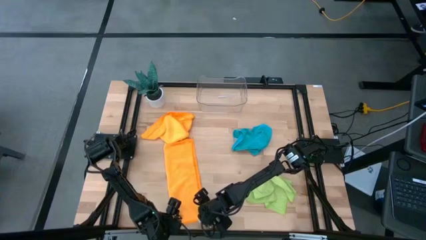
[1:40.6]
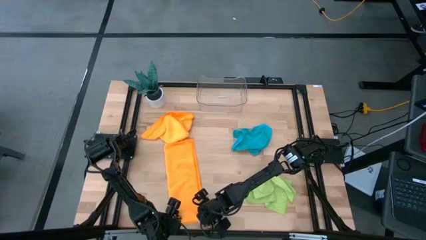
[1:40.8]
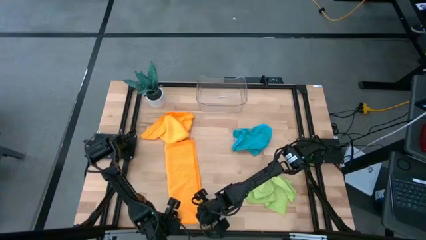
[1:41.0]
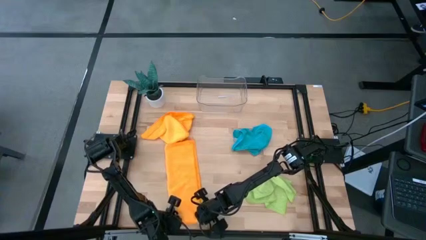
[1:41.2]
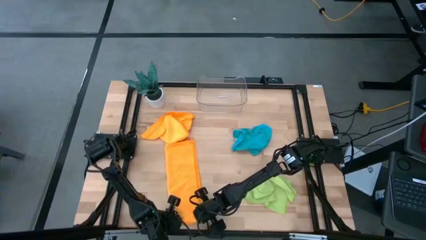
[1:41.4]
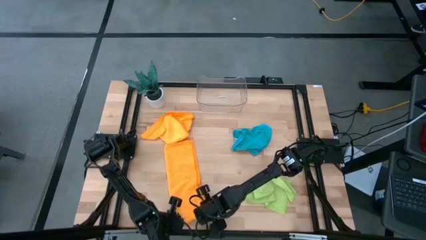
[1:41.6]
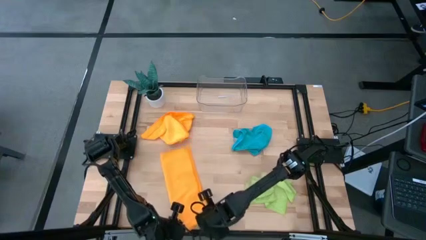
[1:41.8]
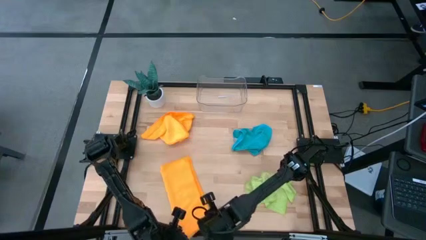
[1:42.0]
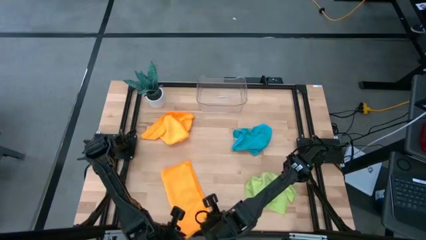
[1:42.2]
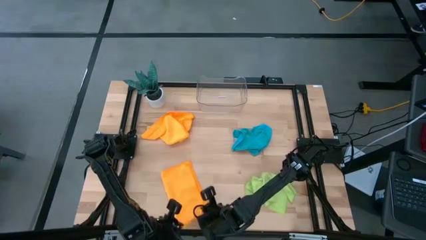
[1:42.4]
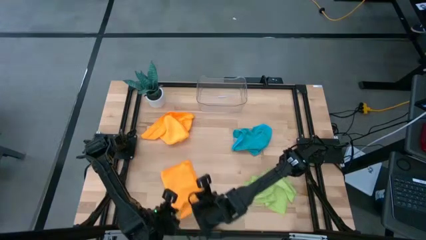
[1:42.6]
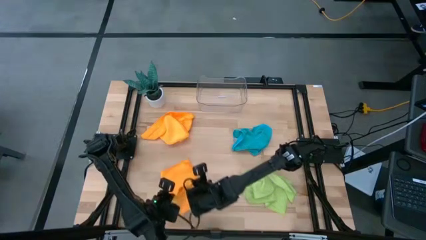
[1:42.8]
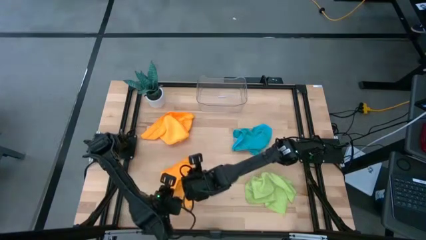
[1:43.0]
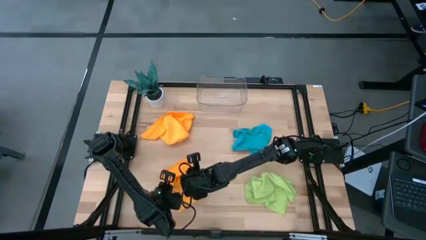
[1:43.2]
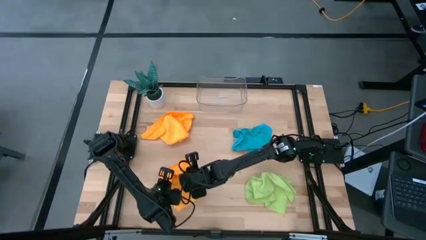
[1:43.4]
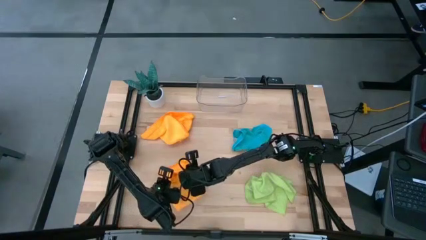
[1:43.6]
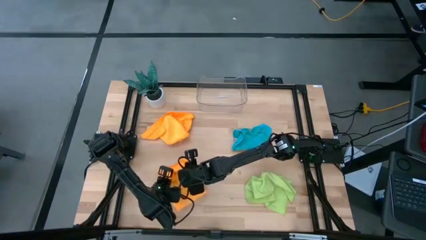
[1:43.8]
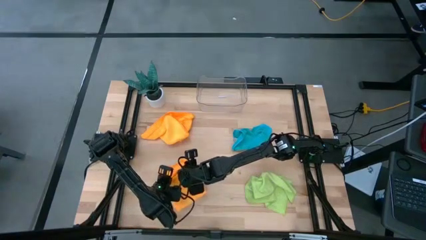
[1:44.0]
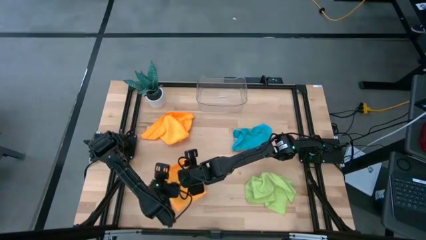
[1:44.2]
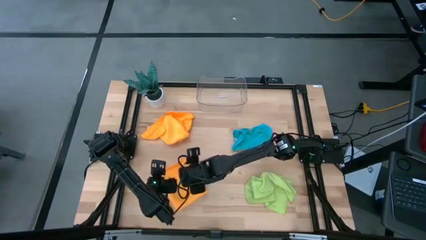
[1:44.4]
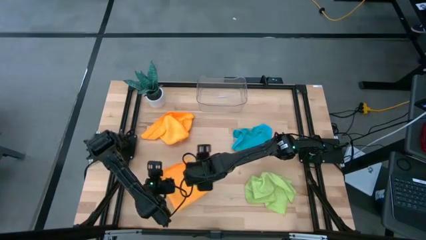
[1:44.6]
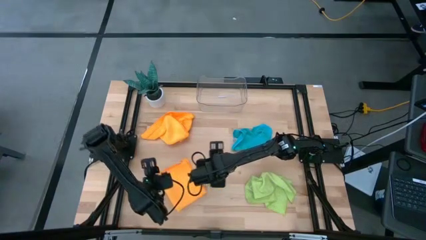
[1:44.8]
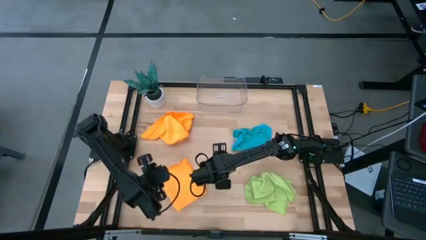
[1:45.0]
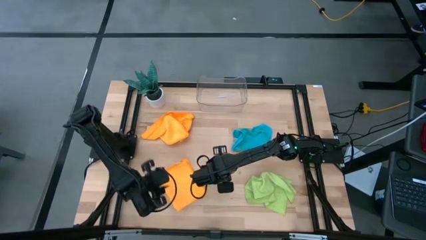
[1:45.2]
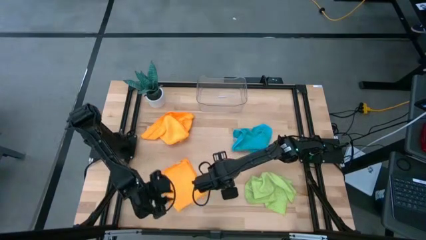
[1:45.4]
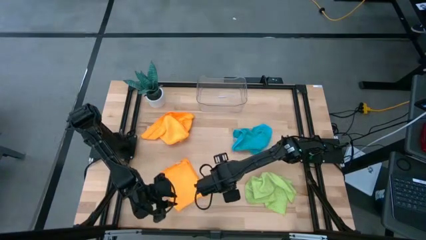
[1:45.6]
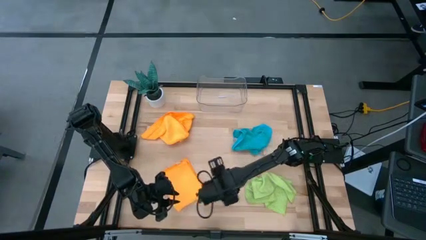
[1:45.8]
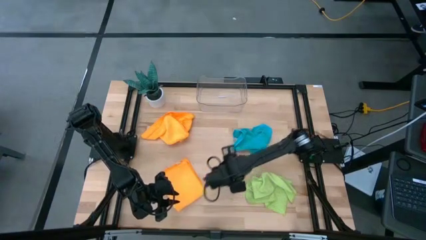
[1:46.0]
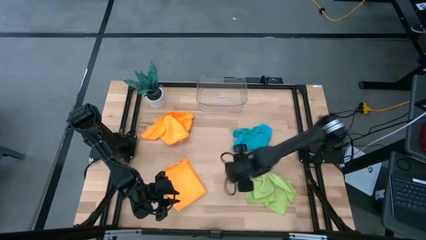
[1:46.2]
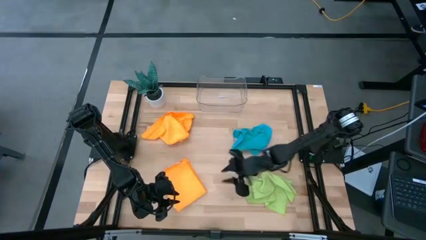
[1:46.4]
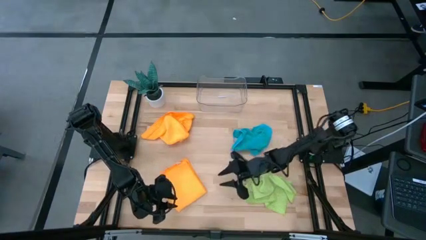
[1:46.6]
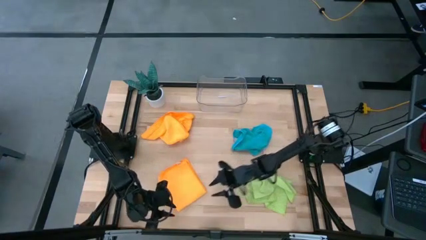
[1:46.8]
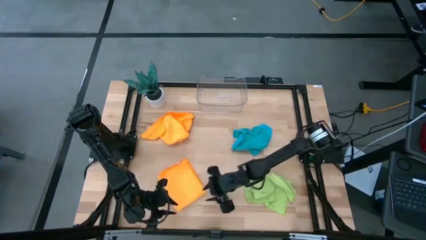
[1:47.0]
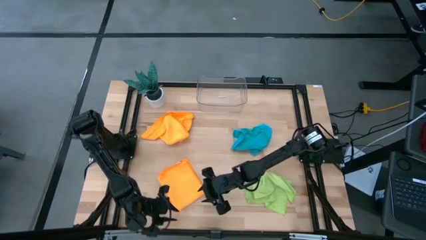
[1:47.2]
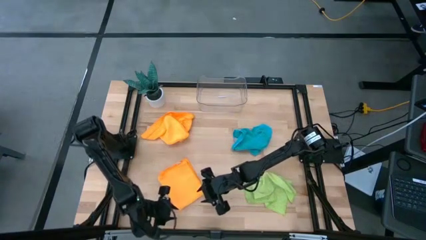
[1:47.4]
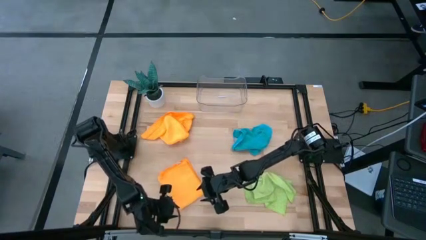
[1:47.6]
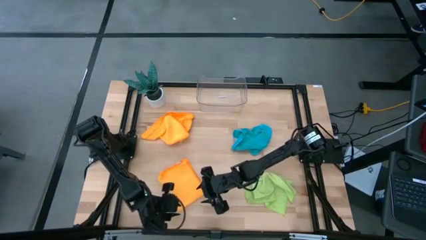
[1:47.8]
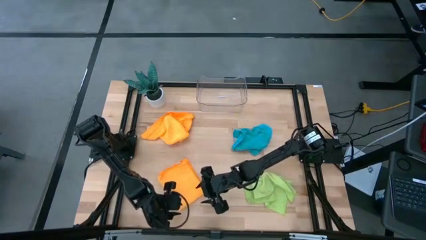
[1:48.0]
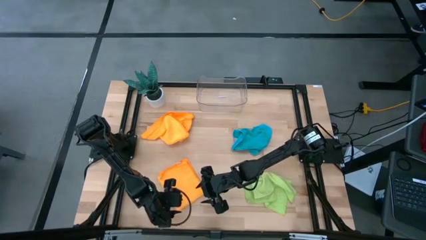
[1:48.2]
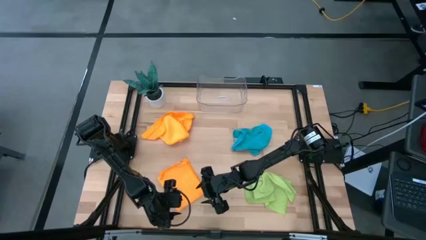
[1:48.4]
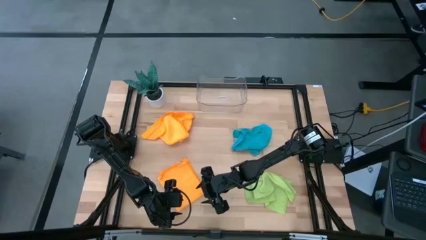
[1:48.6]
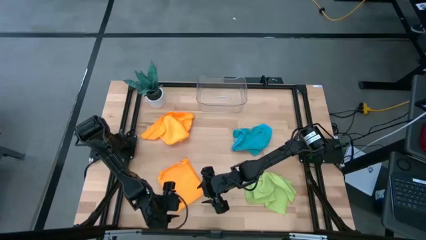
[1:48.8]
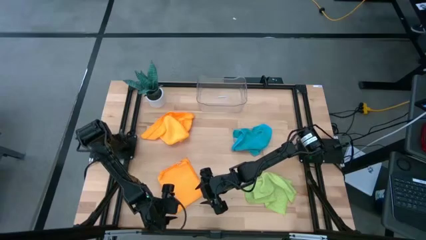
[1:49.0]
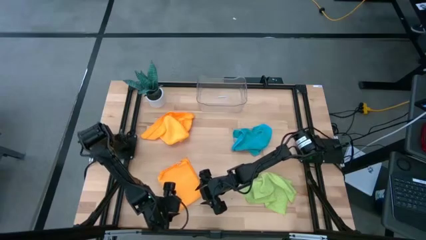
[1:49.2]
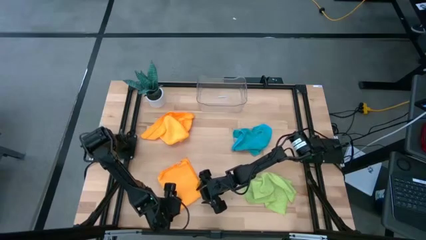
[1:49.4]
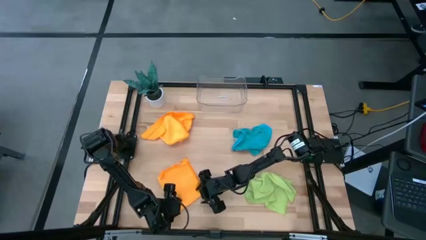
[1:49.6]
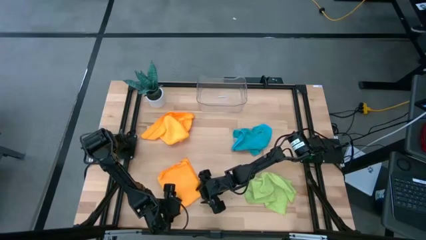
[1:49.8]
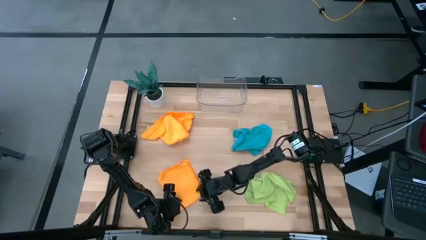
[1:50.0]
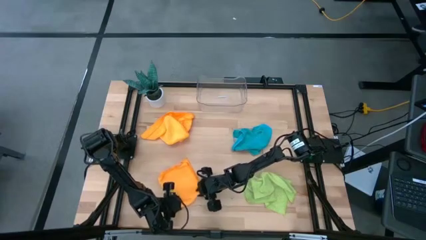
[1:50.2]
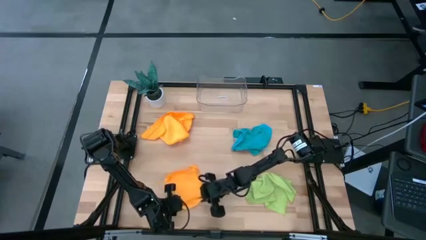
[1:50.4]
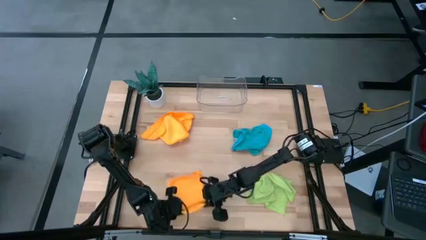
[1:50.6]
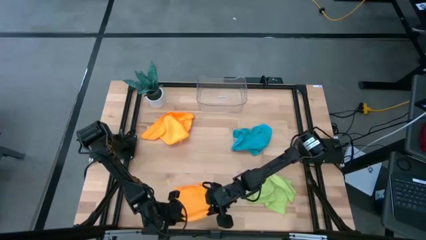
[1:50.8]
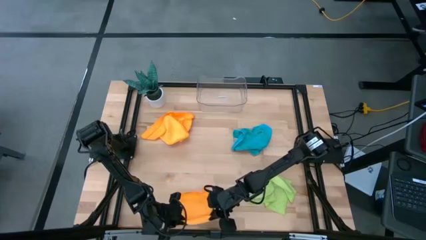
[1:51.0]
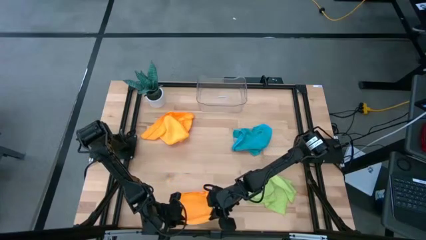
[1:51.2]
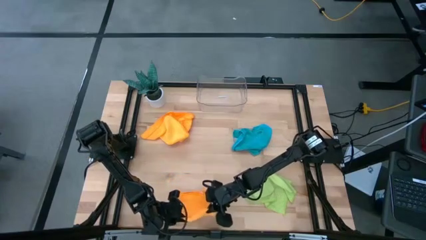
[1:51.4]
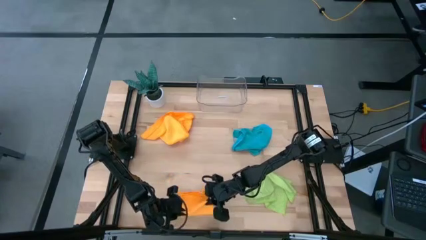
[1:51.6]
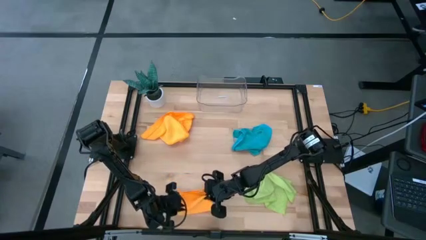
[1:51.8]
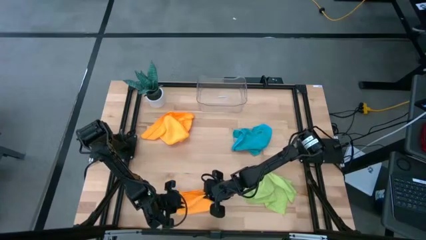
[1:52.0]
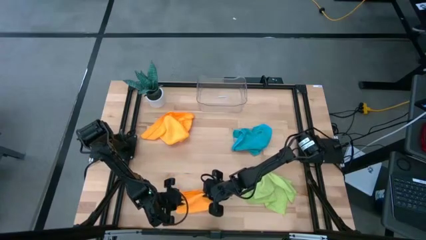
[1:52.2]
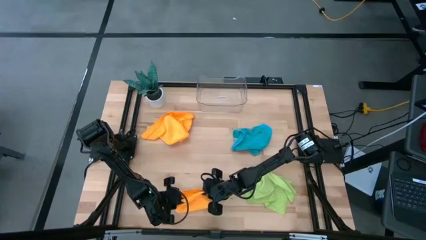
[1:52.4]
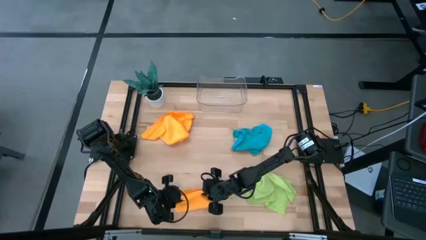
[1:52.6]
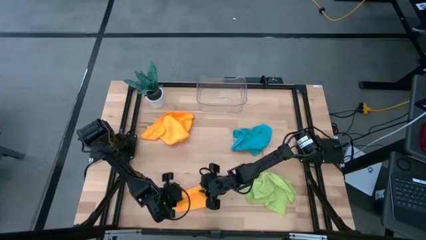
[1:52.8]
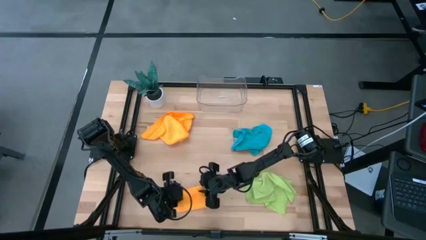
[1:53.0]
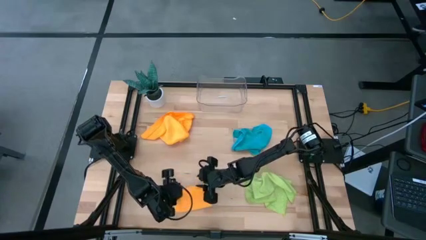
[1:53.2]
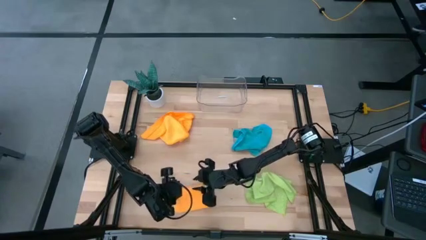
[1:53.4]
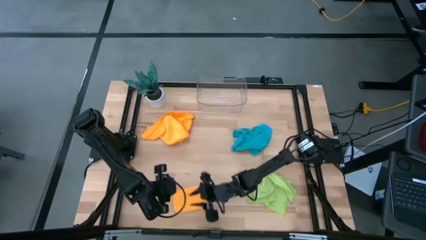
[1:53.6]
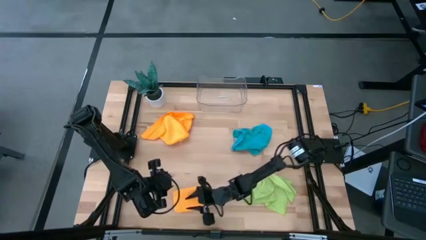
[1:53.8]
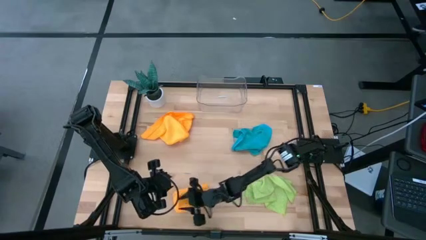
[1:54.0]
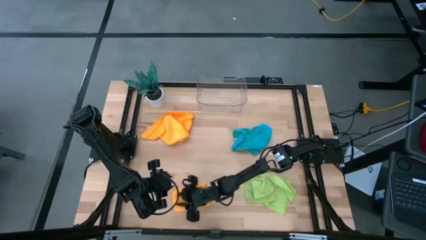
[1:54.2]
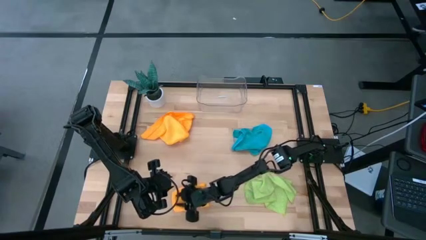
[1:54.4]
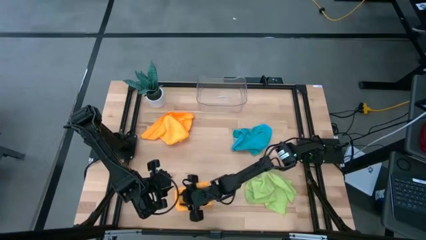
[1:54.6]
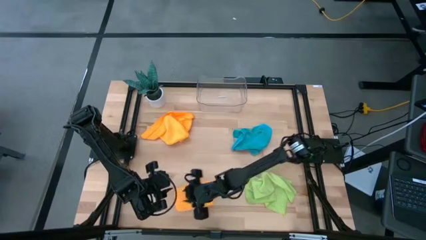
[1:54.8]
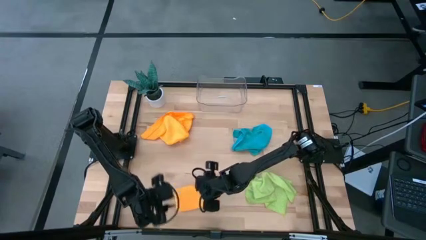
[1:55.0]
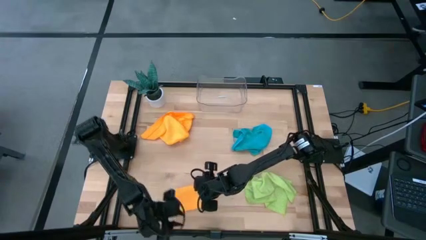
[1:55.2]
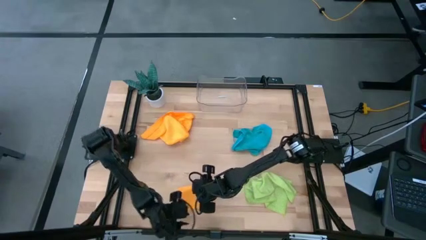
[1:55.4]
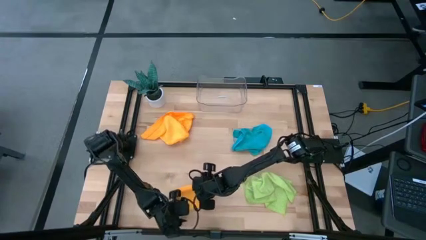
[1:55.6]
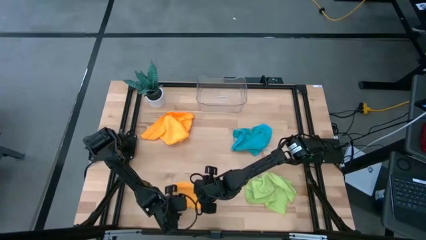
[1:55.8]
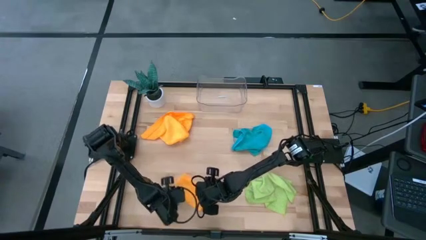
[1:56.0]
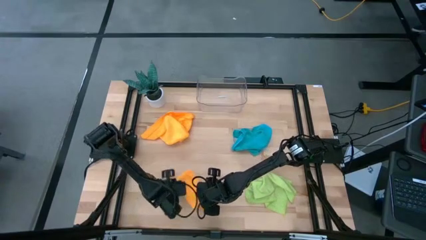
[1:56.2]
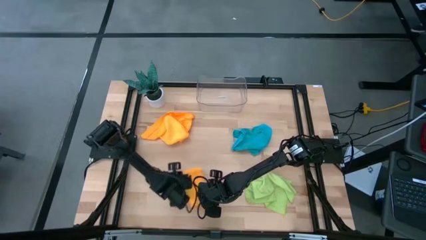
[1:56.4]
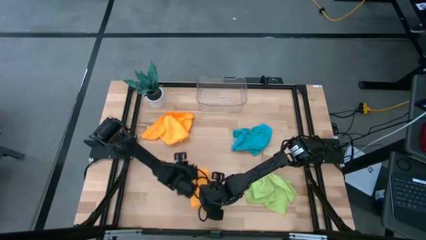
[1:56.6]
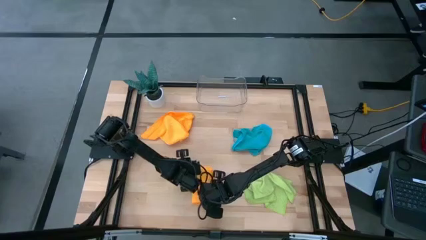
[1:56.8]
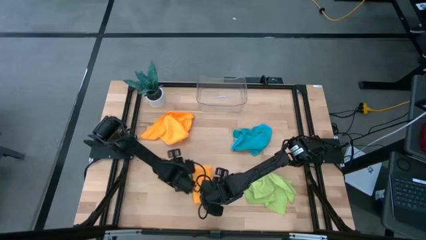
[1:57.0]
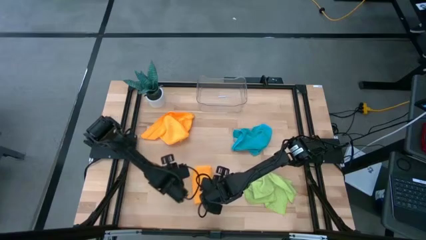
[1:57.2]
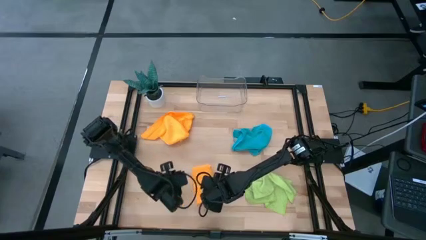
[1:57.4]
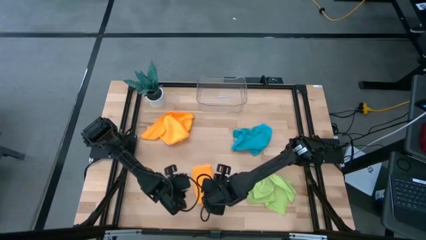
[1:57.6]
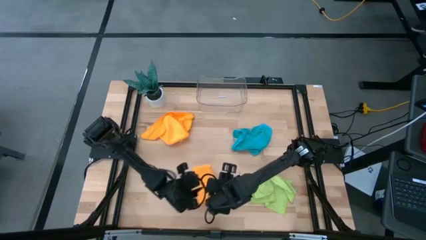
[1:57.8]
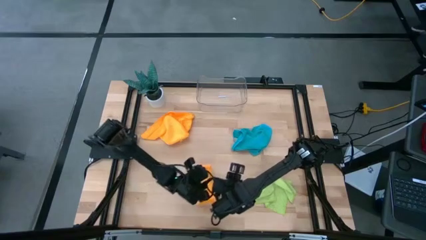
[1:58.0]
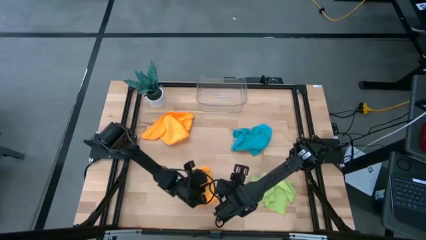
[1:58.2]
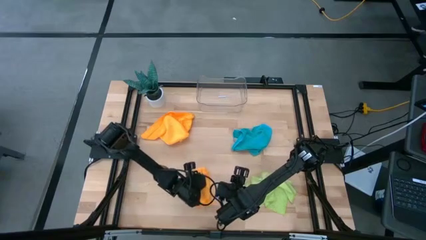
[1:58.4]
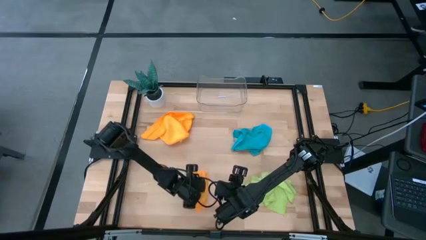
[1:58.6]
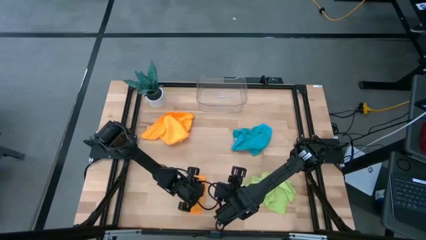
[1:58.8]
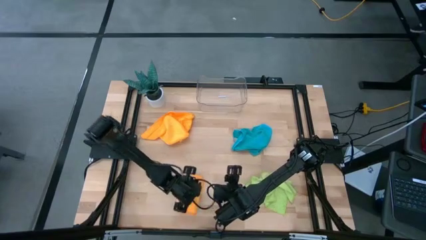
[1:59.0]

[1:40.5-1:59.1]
Task: Fold microfiber towels
Fold the bottom orange microfiber towel
